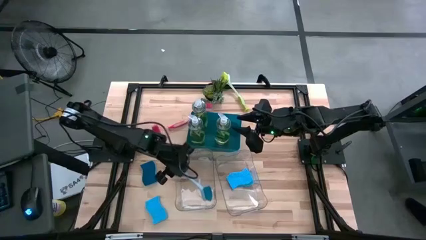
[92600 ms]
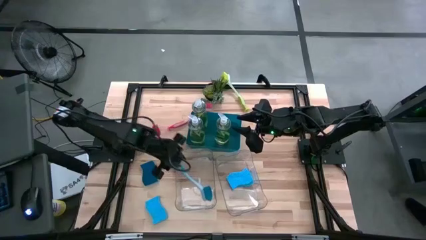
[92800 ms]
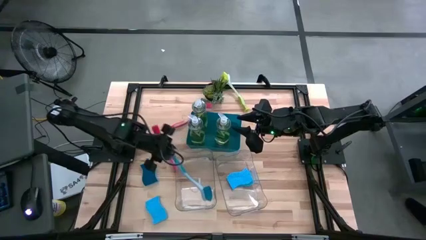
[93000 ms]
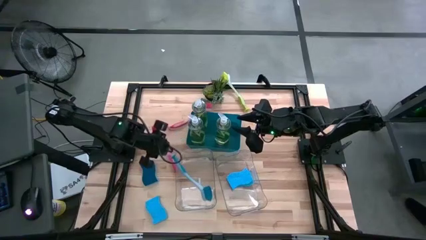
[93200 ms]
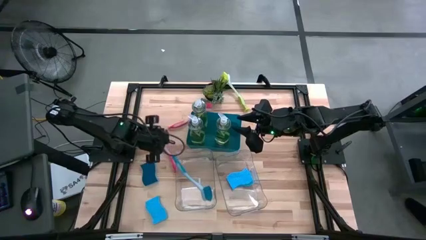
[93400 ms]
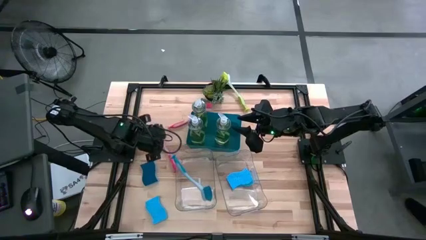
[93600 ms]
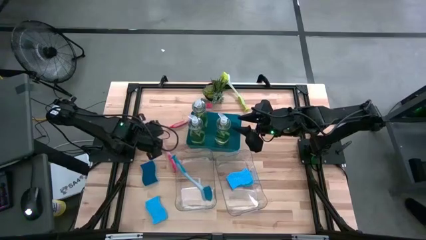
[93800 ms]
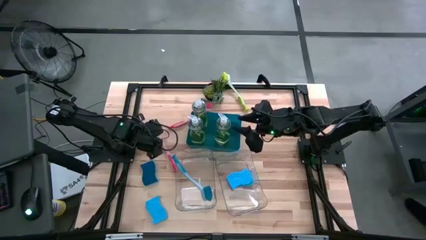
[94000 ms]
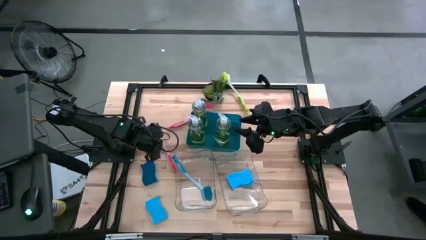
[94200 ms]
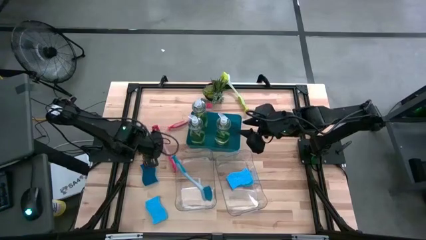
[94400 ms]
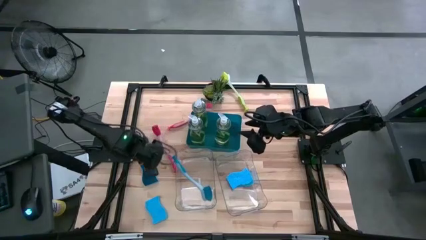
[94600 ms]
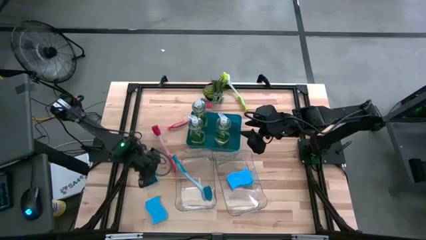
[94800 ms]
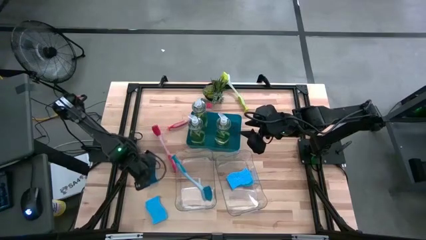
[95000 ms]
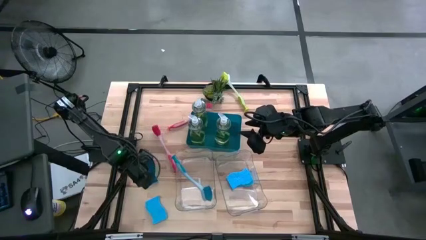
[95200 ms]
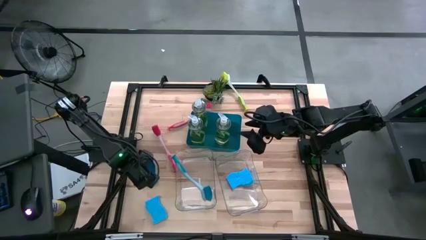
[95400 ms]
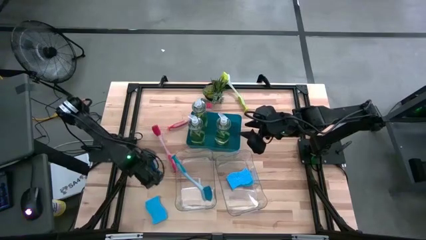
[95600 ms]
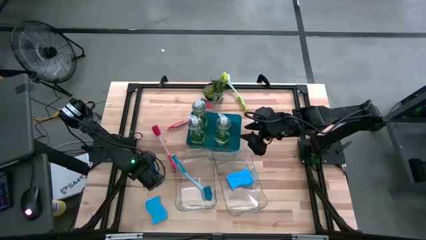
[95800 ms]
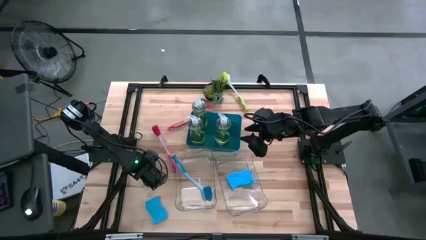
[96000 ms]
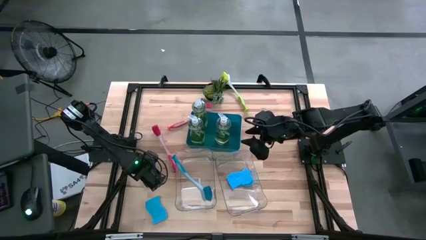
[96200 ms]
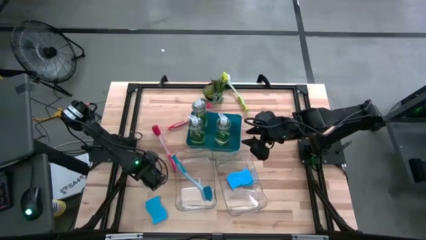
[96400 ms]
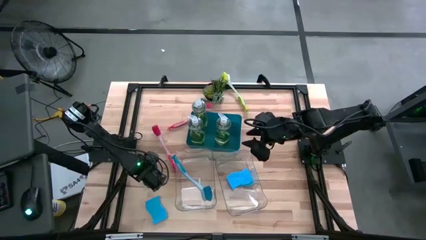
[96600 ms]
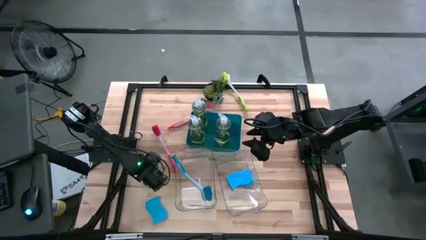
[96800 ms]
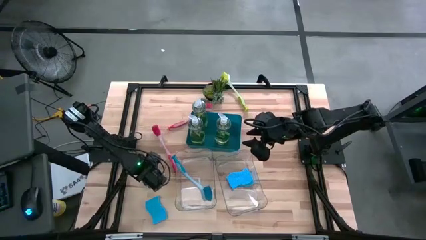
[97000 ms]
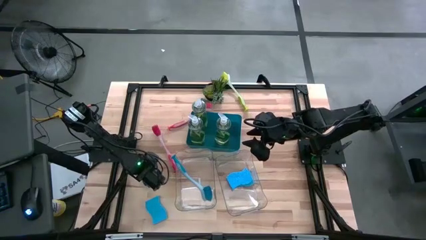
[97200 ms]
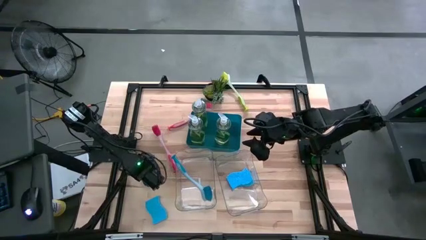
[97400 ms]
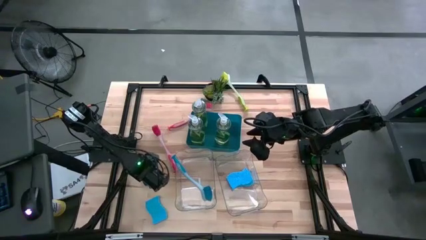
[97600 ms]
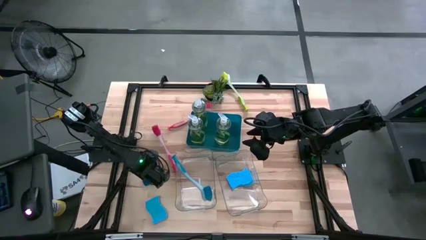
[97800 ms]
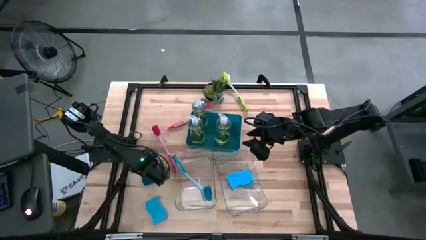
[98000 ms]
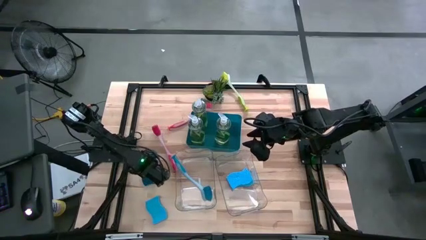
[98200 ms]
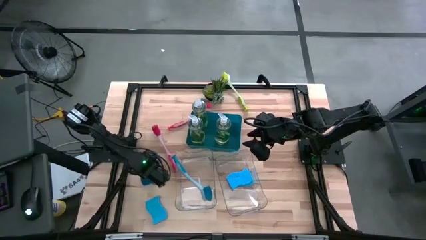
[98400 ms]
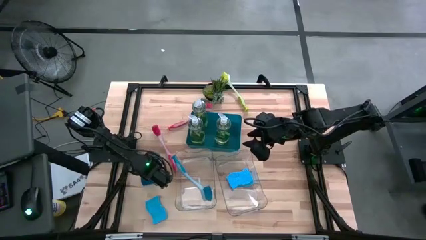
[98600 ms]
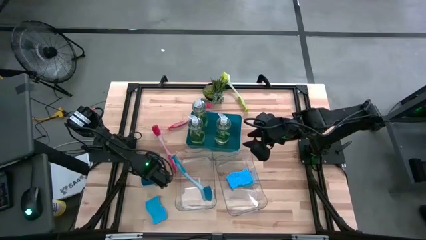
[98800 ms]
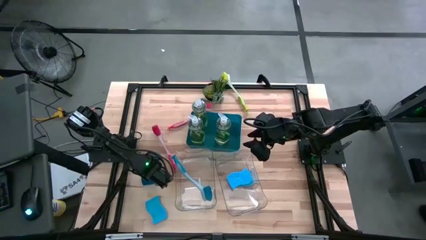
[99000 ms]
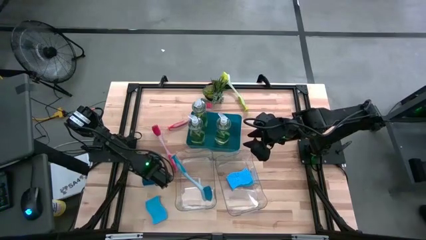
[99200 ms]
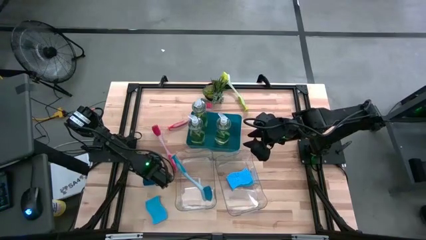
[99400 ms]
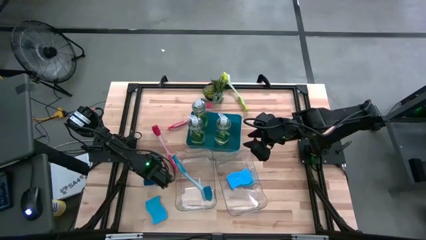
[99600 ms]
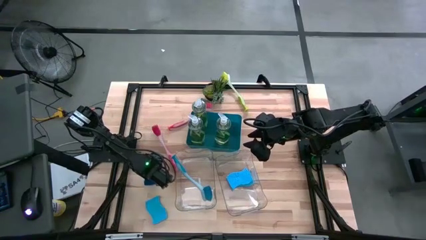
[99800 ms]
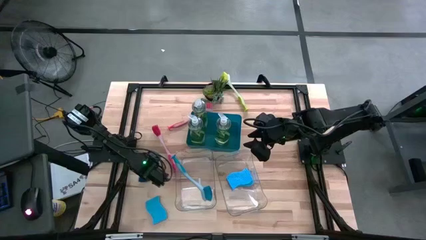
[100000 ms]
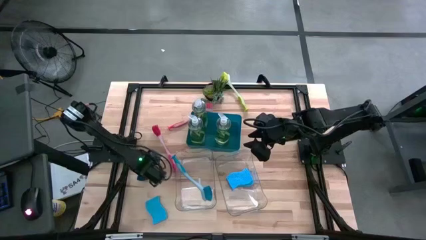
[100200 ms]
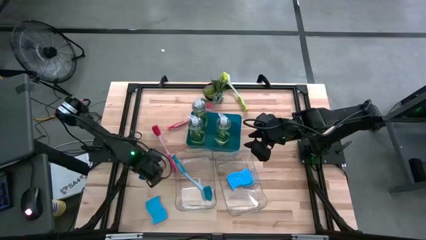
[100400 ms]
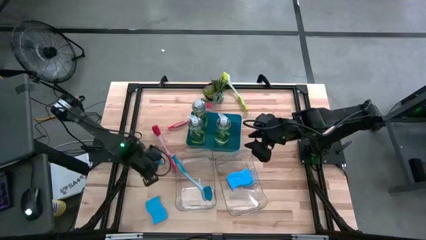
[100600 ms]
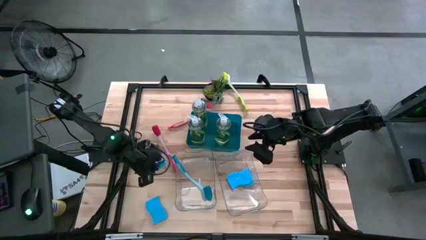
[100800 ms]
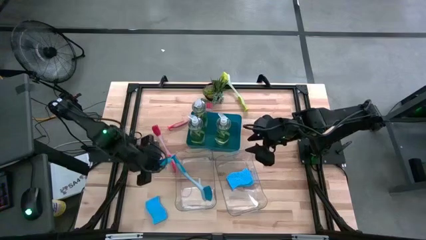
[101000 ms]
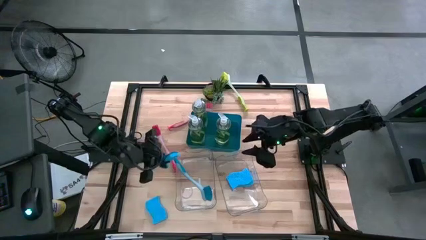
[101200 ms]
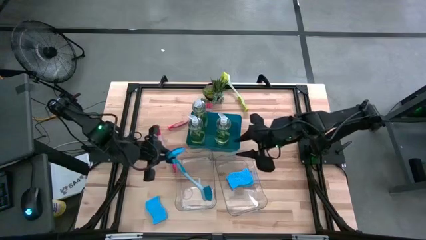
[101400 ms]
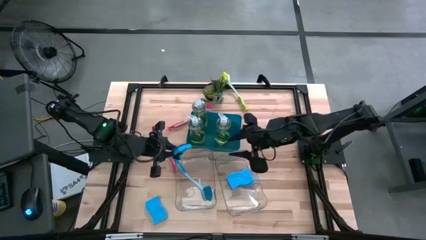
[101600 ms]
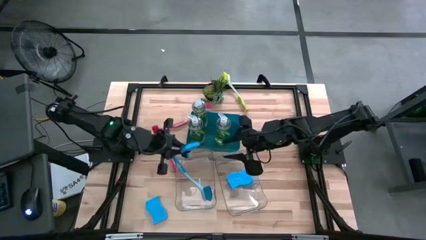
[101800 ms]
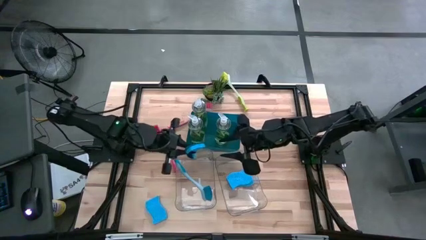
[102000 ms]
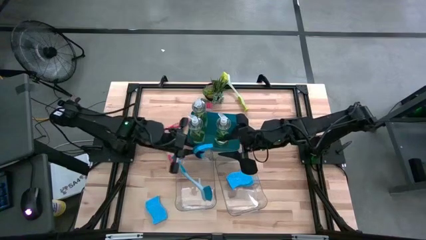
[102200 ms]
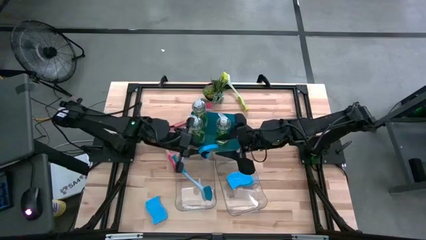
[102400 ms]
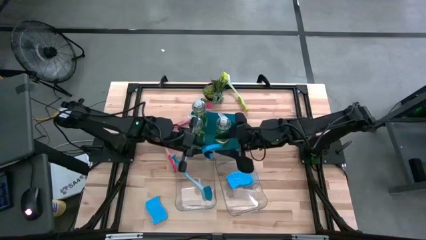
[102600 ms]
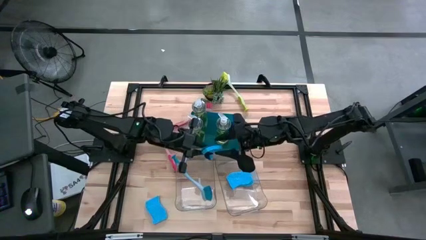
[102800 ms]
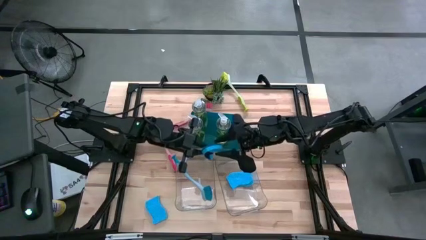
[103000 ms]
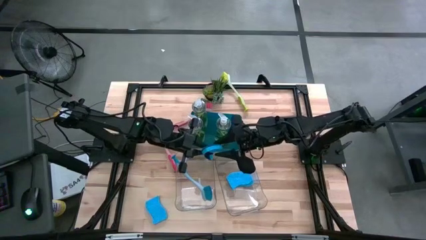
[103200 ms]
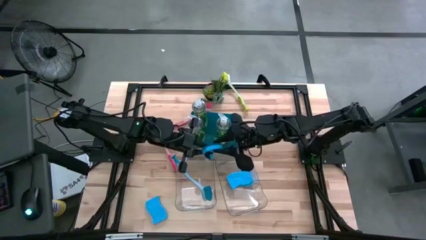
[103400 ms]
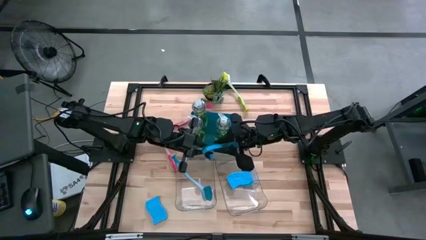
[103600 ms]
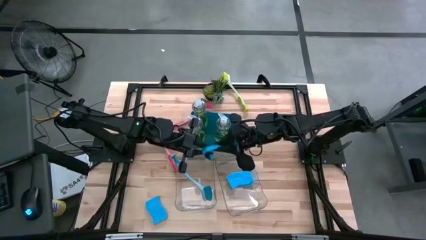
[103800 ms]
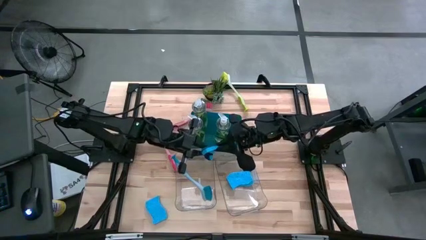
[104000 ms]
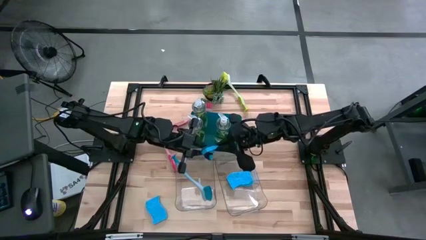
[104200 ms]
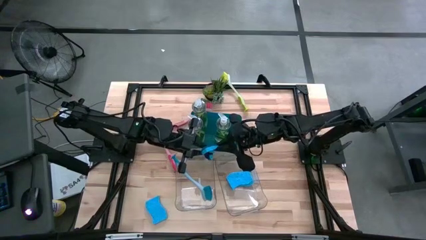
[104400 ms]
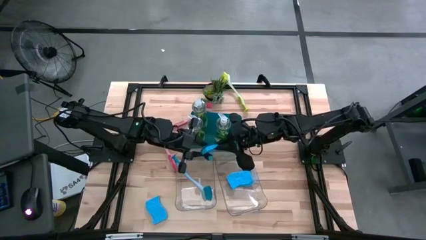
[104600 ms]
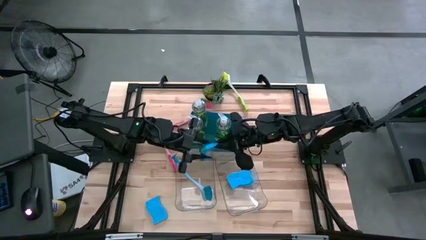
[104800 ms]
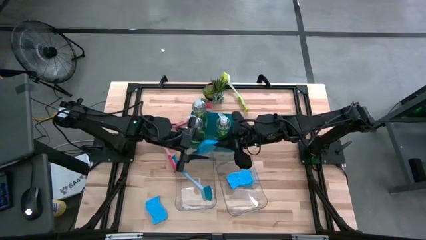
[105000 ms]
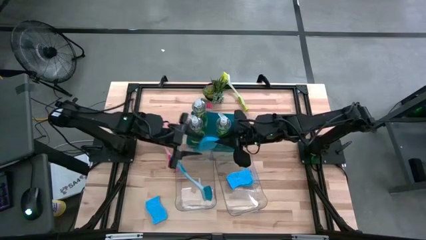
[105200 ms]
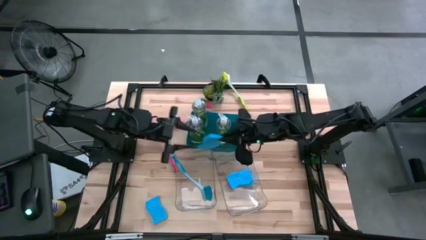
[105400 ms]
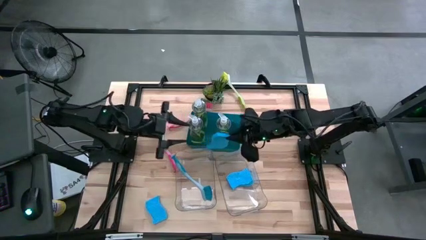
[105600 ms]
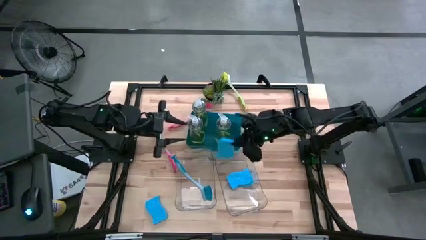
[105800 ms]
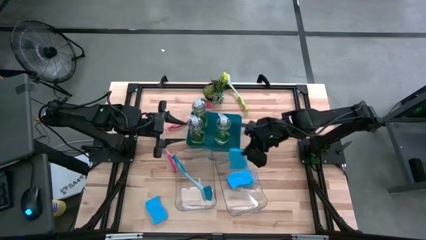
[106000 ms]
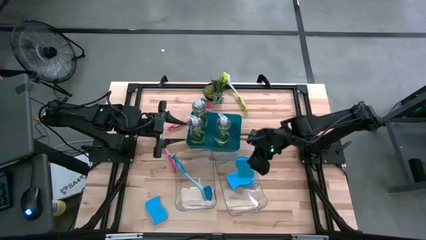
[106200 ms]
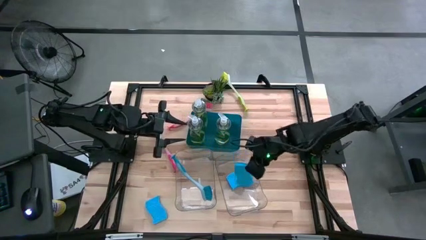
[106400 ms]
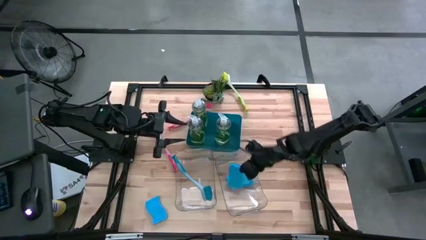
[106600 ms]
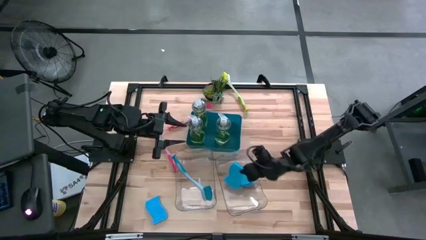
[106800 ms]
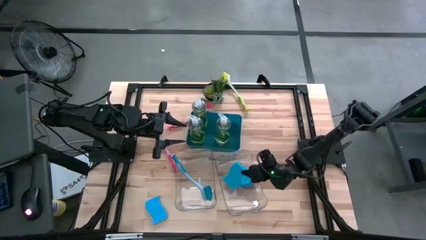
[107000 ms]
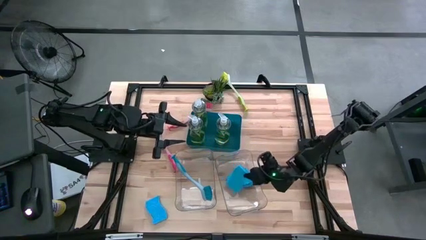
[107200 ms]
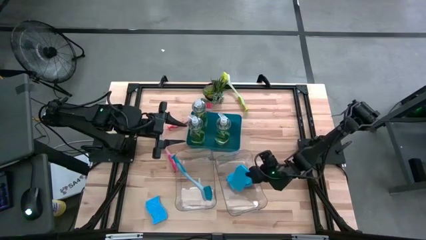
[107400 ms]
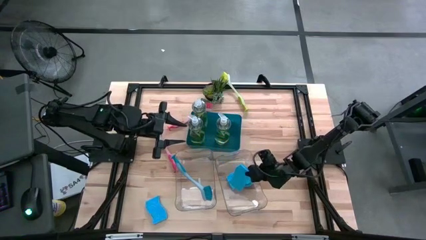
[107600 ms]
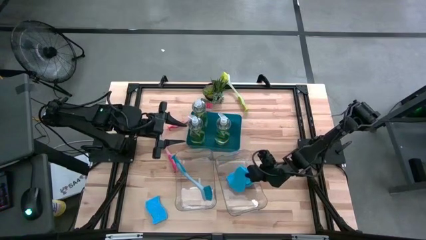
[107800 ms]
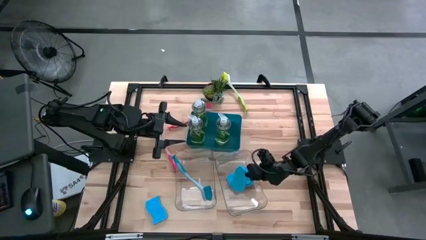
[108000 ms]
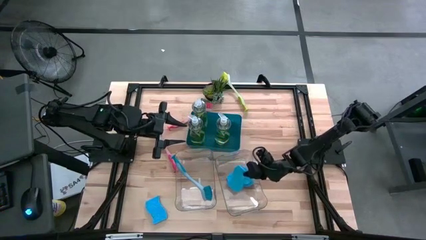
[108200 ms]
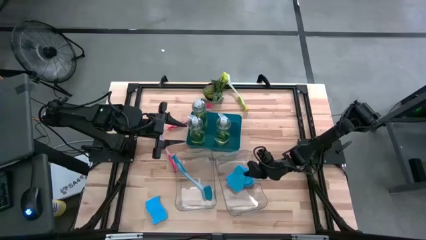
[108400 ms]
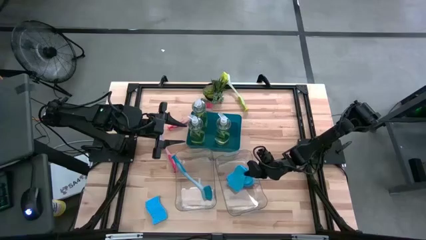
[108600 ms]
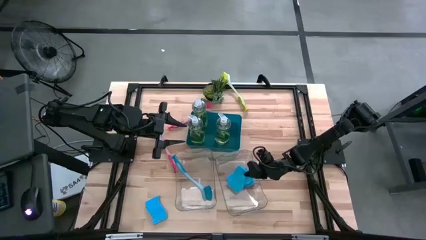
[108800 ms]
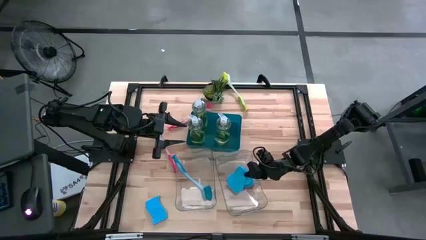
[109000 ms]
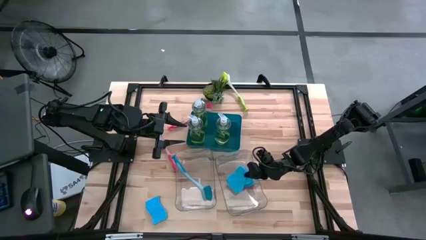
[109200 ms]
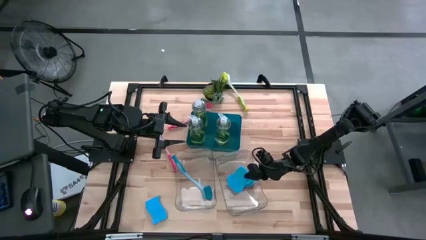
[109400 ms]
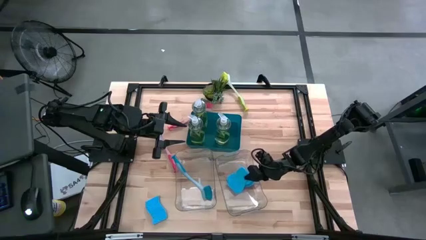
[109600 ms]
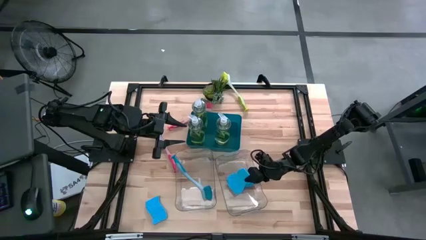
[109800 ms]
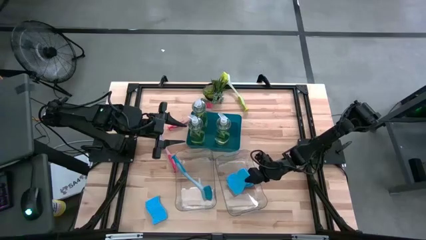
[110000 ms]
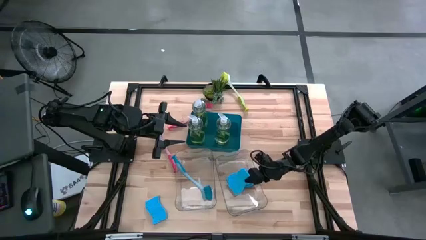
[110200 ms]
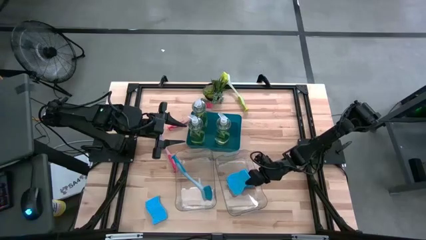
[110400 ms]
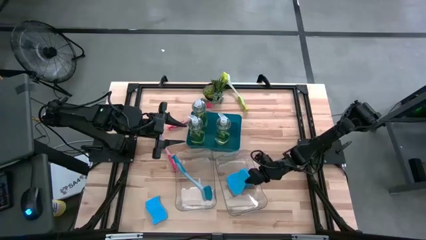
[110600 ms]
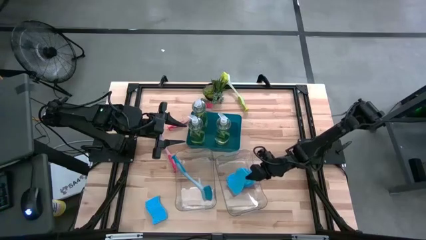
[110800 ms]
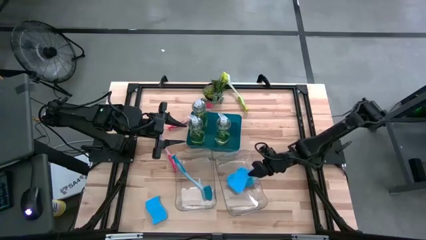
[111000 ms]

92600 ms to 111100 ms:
Task: Pick & Place Kitchen Sink Supplies
Put the blue sponge into the right transparent bin
